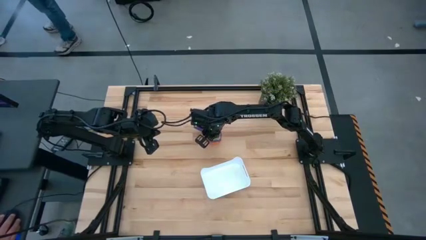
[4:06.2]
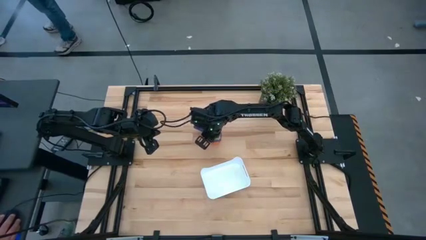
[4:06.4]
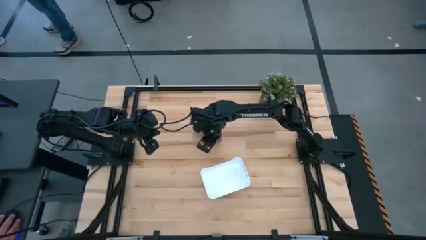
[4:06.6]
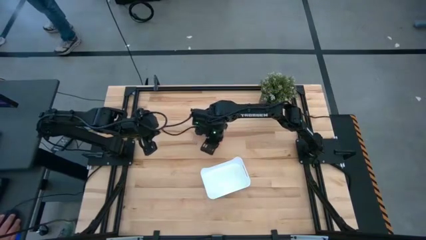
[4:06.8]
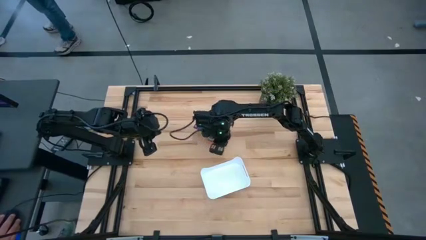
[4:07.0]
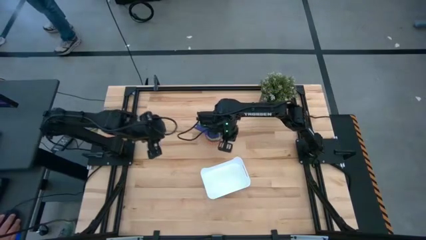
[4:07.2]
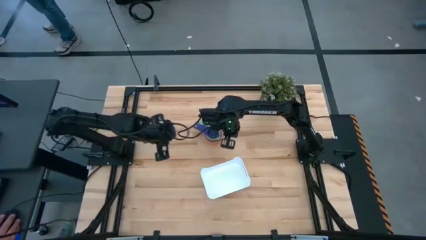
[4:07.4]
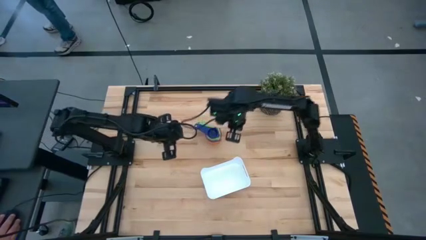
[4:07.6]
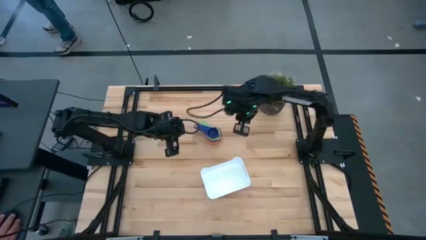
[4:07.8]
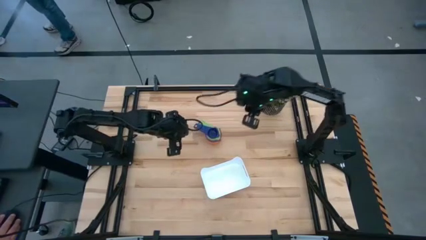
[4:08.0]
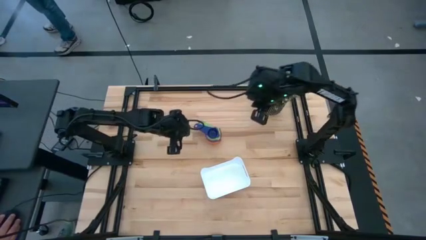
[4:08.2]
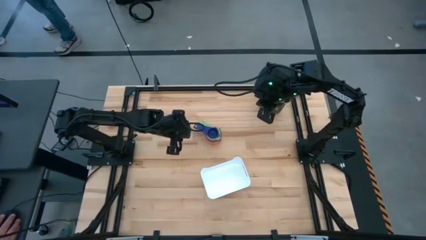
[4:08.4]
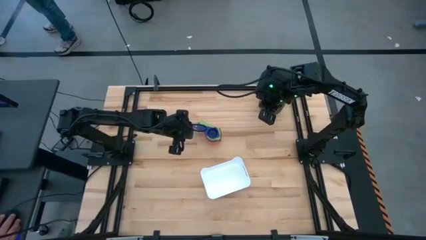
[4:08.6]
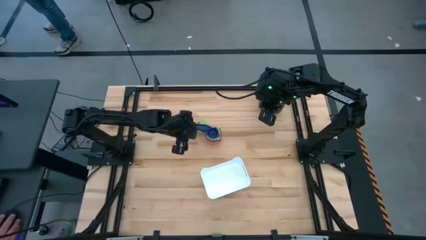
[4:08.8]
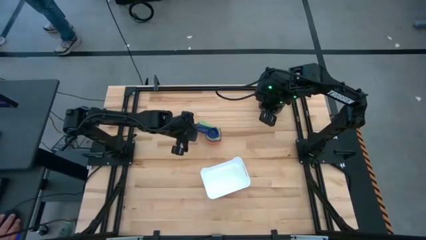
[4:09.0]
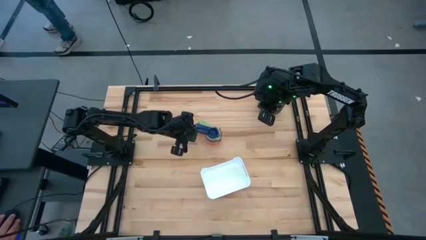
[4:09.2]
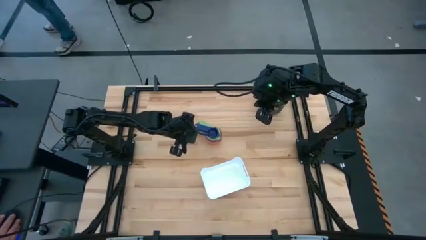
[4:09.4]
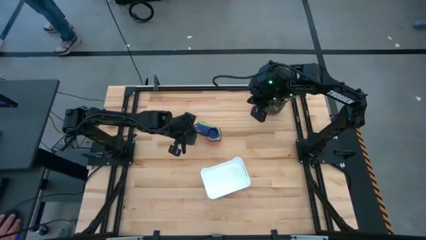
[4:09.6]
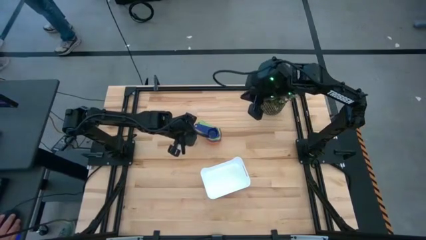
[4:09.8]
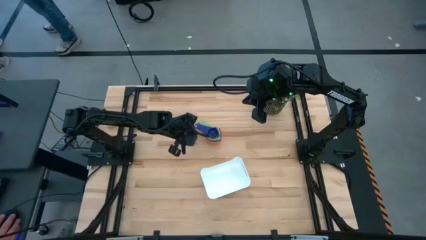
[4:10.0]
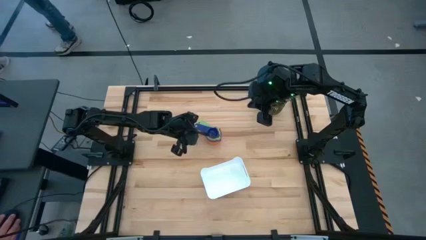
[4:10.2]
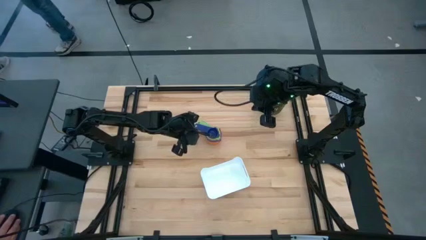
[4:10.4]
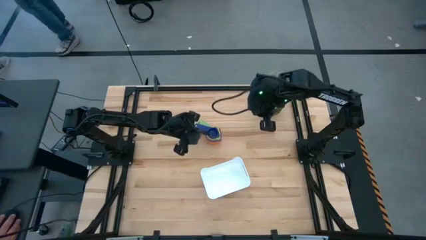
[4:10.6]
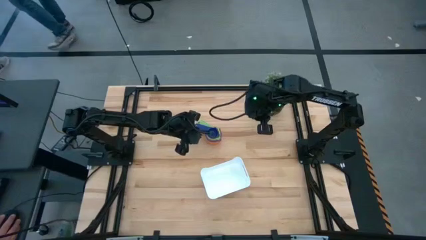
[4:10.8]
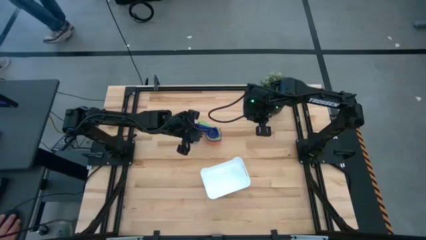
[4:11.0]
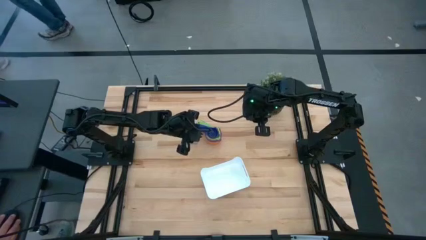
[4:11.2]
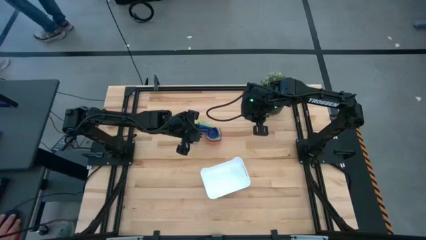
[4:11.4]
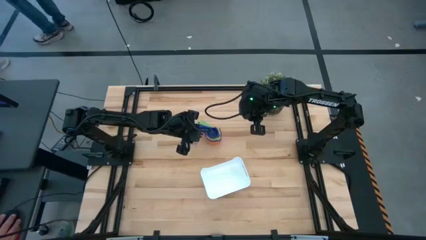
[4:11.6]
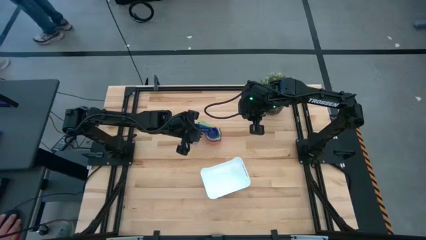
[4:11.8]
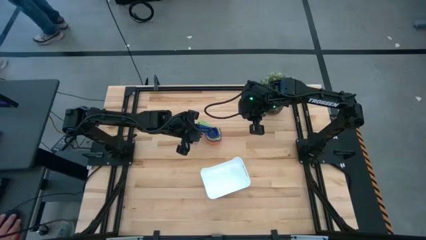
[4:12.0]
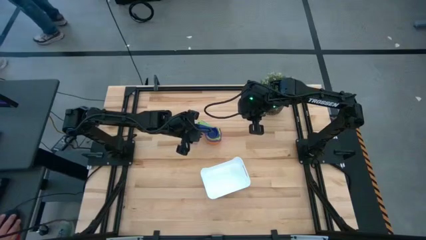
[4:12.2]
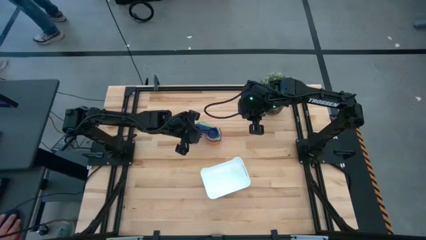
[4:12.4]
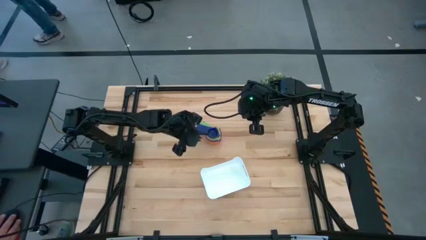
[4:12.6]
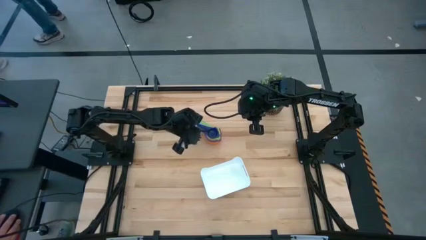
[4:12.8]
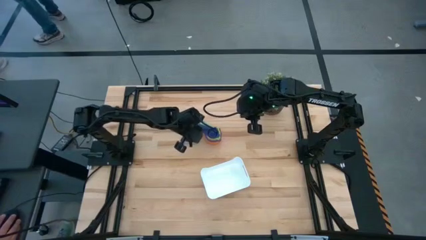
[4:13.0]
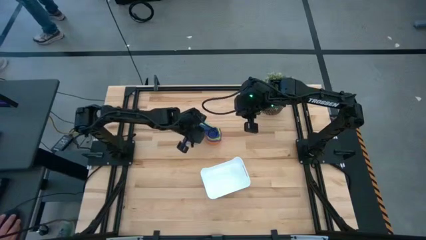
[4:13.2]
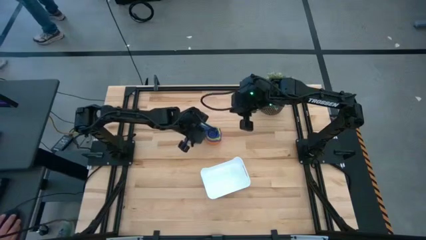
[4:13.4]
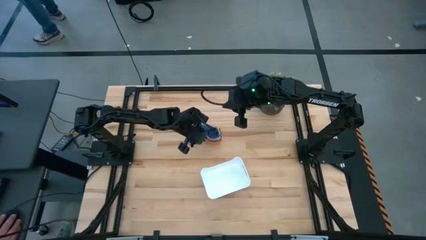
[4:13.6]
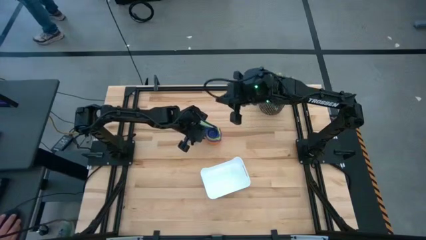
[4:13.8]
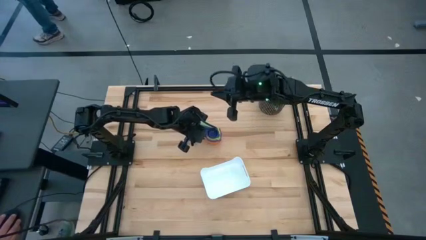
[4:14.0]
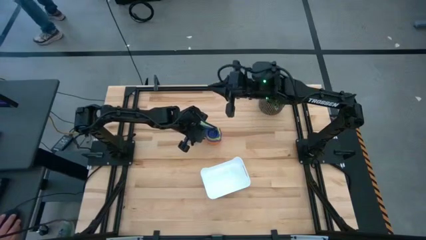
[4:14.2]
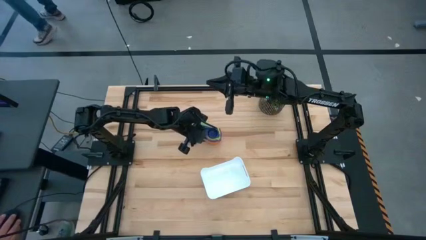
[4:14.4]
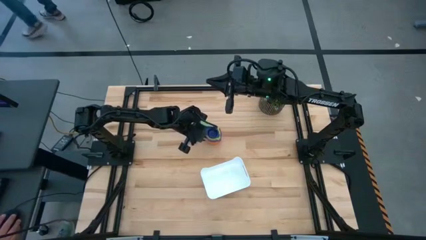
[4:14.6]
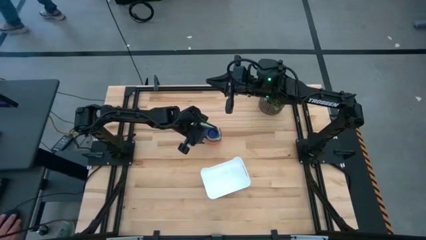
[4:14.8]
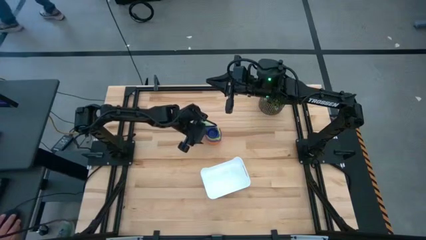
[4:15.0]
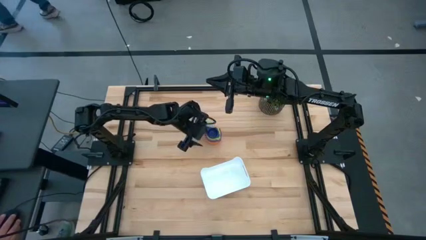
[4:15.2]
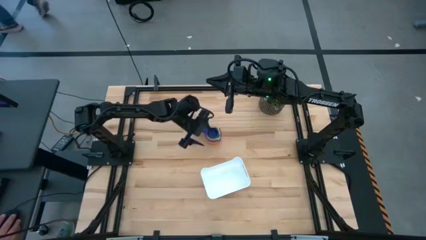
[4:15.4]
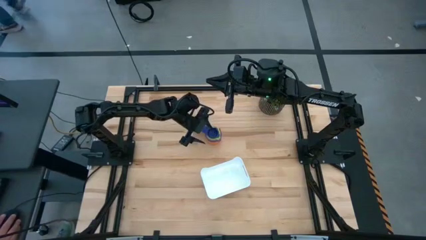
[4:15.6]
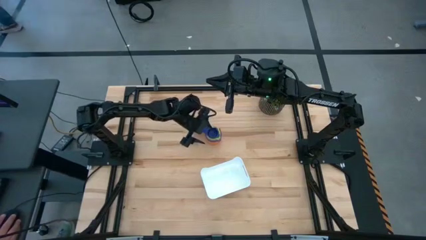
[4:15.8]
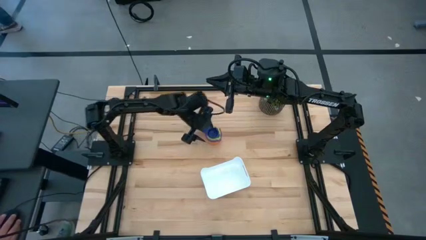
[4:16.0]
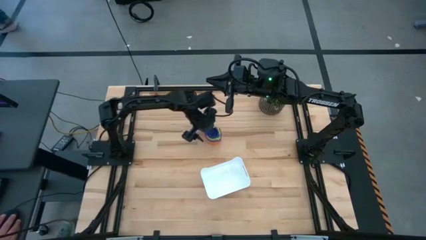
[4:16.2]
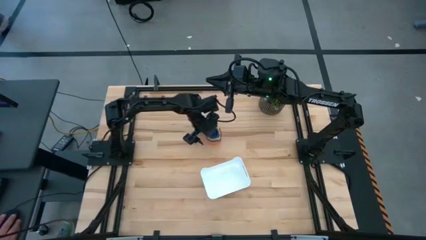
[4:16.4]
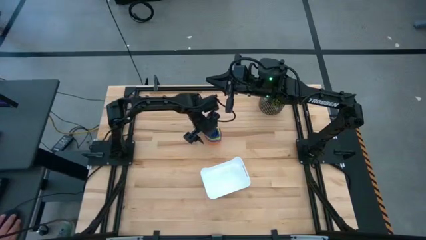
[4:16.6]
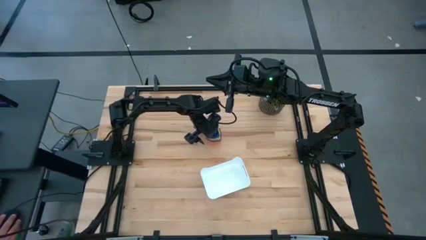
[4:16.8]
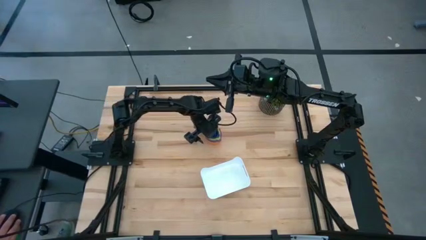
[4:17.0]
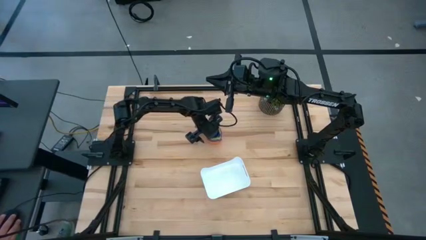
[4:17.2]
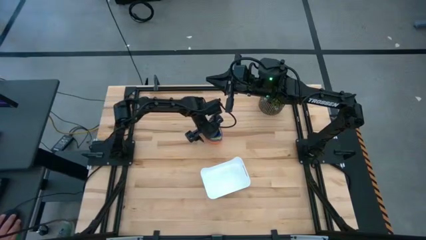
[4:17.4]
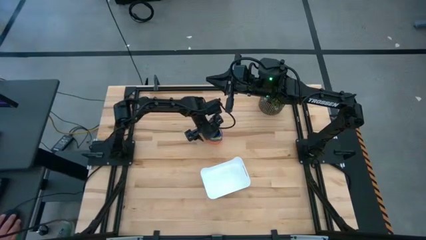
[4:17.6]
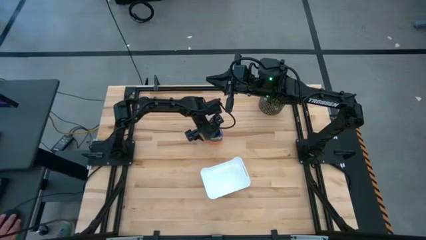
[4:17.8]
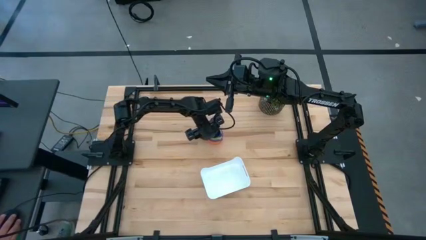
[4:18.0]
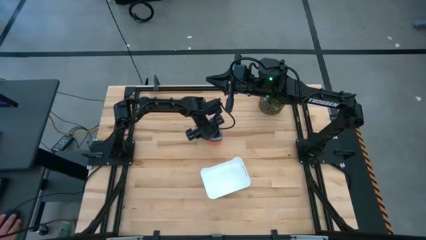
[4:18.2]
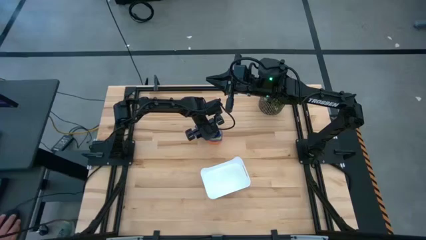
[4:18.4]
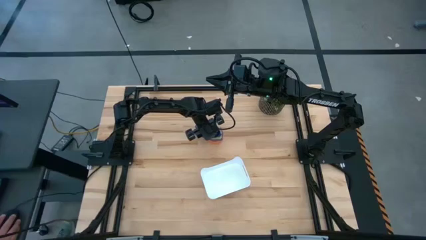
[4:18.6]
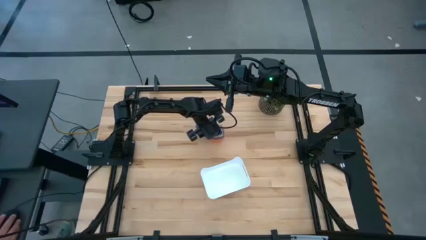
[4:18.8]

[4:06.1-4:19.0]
Task: Nest measuring cups in basket
Put the nested measuring cups into the white bin

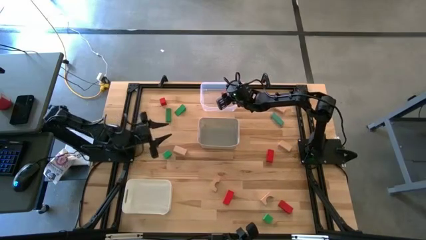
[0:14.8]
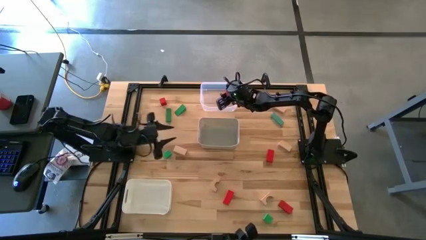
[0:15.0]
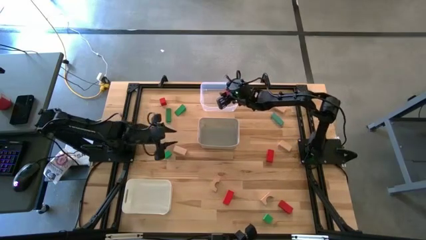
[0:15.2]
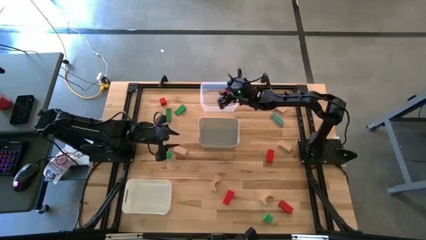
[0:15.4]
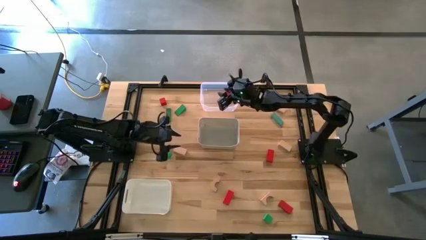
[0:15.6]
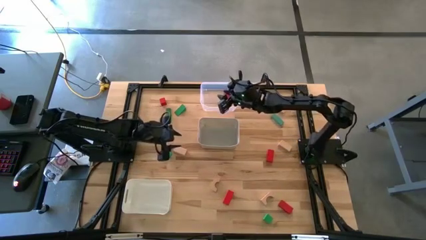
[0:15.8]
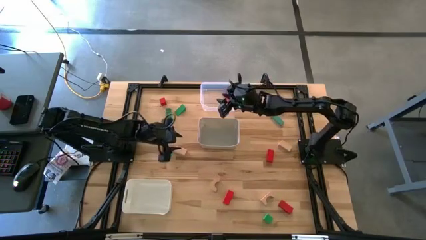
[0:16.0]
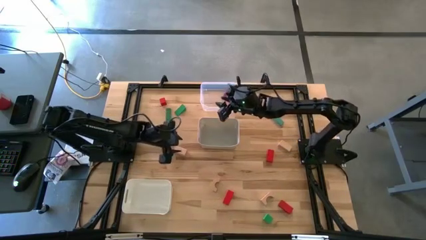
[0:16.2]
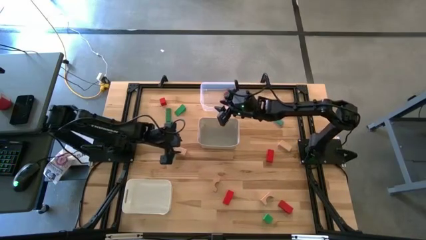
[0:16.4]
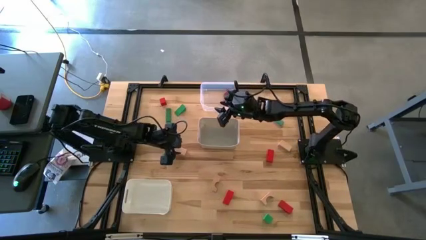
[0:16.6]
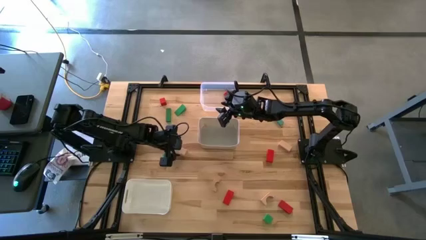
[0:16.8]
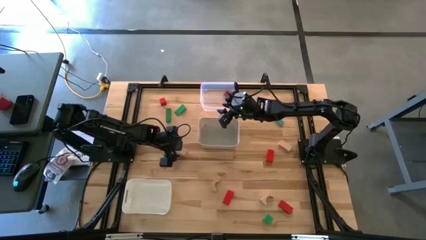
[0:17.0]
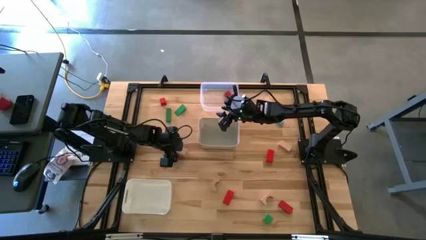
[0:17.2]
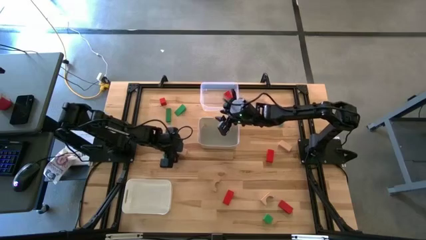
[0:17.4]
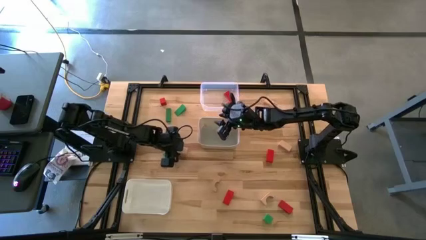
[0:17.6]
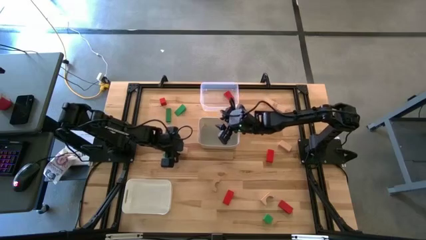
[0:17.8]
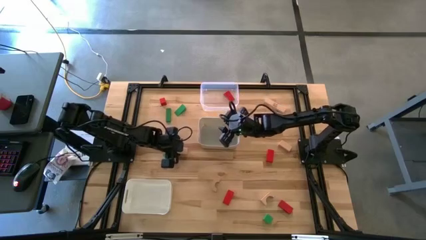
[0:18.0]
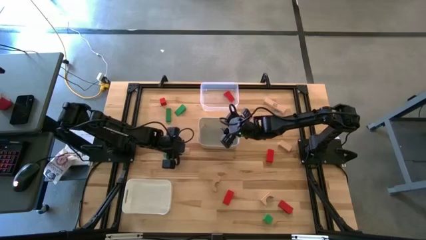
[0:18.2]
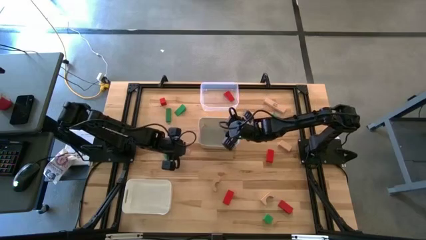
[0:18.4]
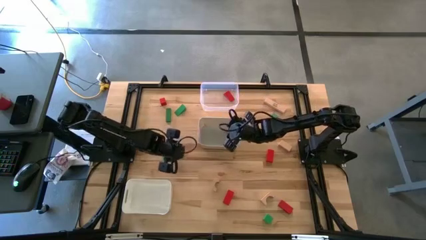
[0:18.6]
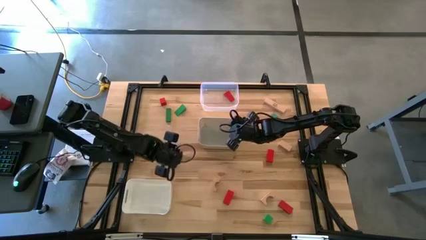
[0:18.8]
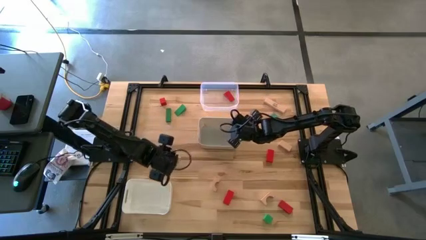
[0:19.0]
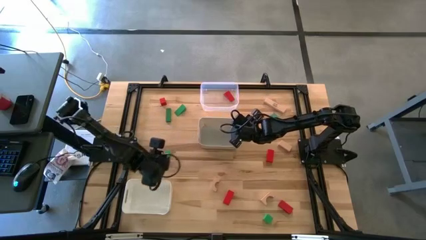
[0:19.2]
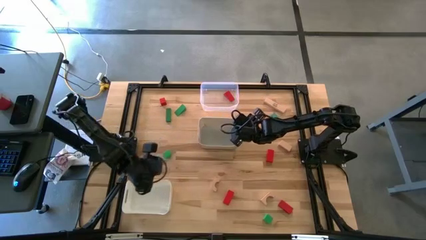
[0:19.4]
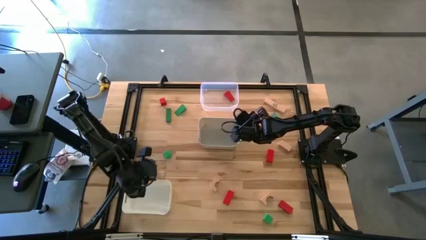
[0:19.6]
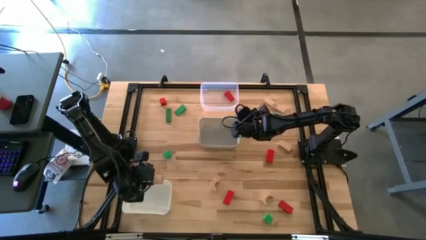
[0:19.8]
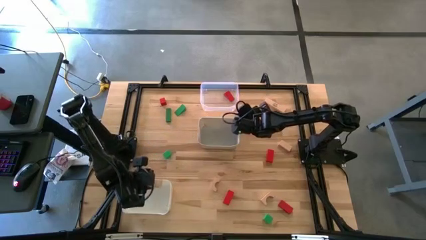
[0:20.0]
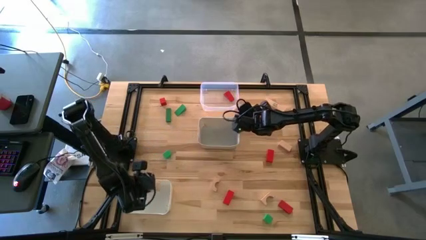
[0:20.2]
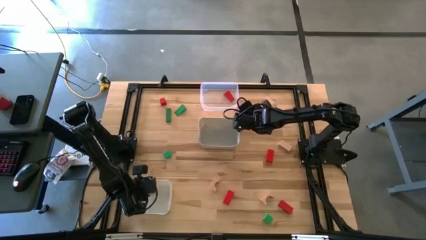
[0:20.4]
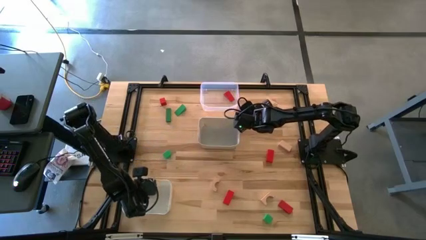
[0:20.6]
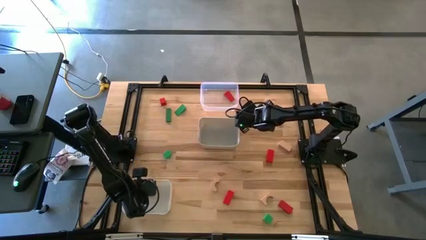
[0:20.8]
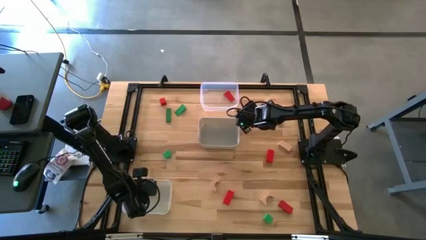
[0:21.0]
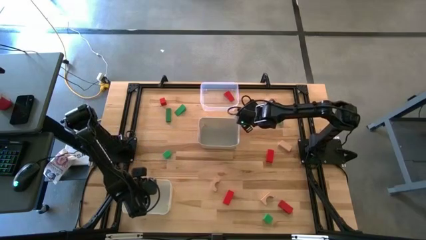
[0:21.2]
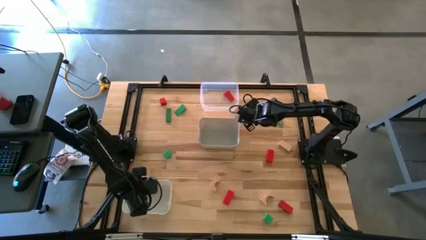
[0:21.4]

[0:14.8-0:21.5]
Task: Sort & place blocks by color
Put the bottom left brown rectangular block into the bottom white bin
